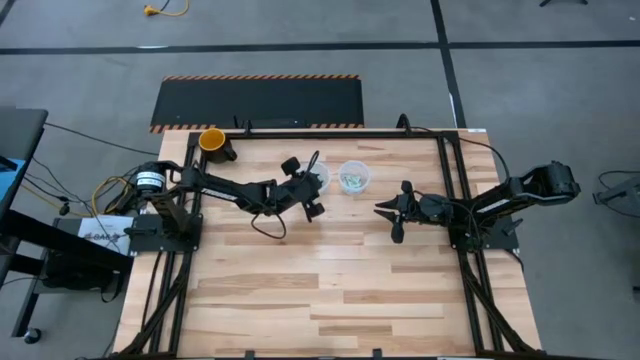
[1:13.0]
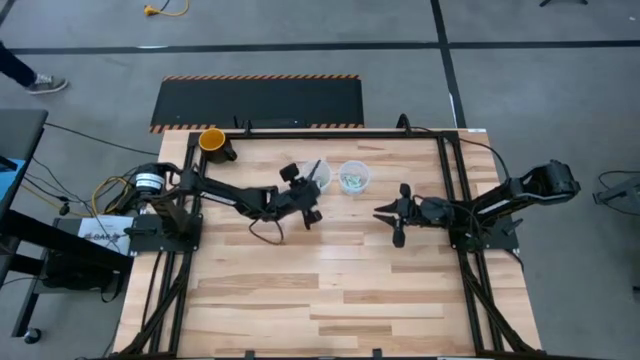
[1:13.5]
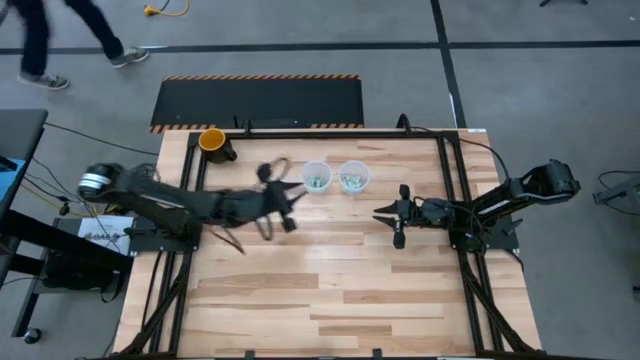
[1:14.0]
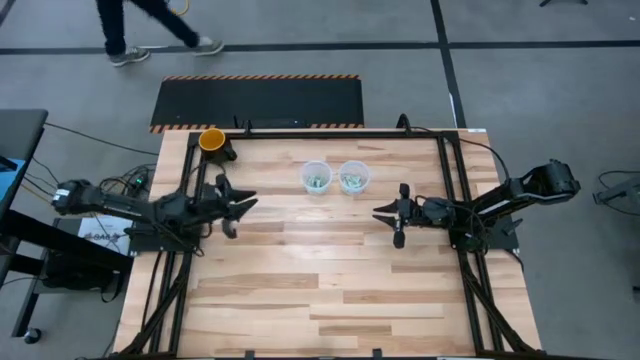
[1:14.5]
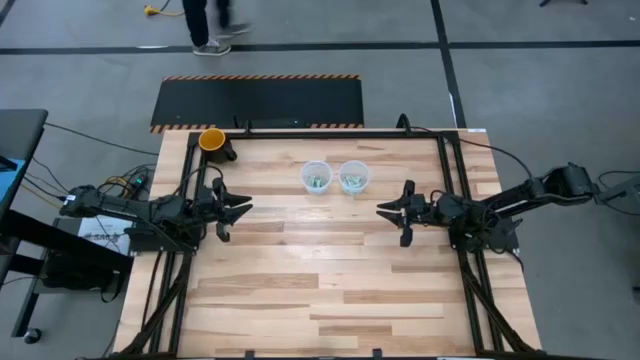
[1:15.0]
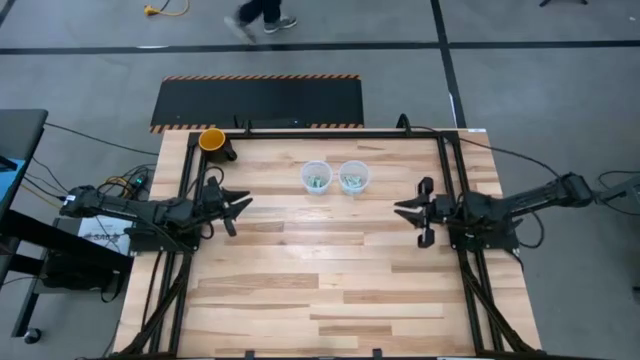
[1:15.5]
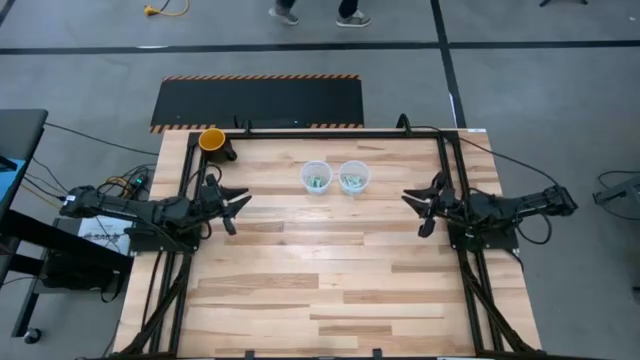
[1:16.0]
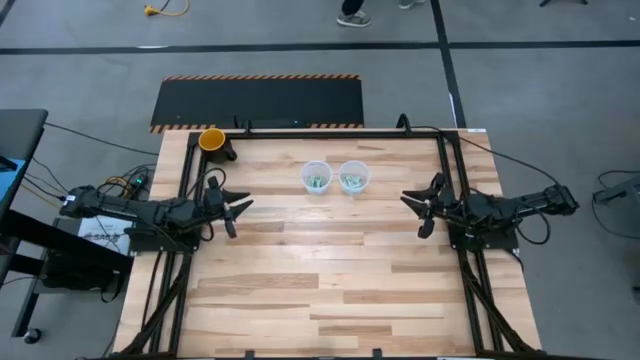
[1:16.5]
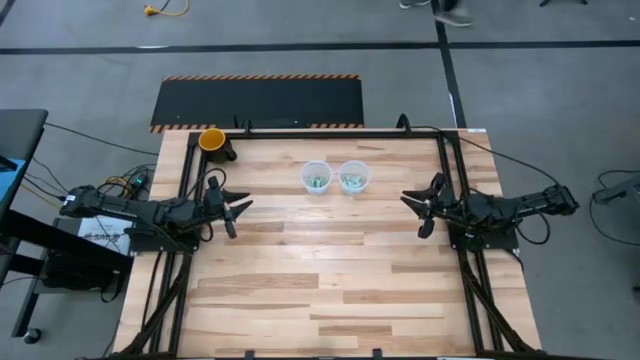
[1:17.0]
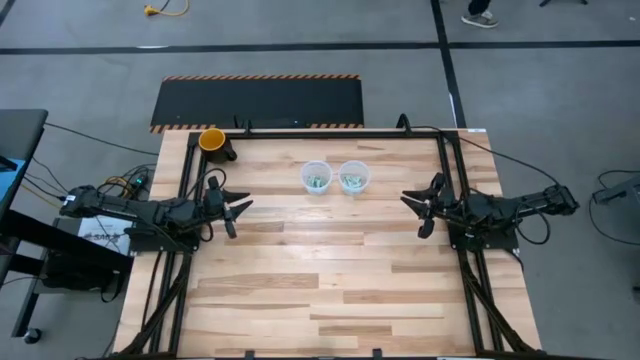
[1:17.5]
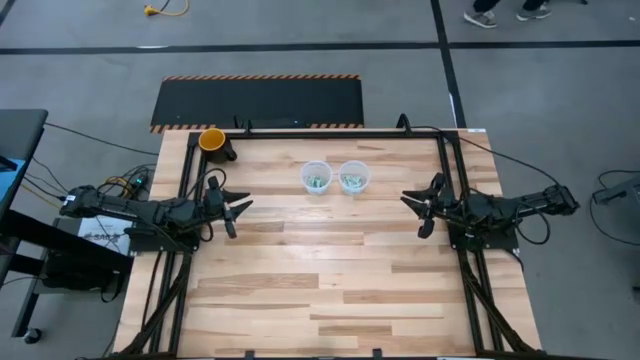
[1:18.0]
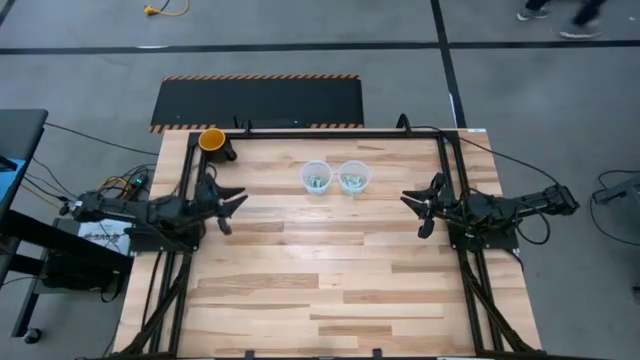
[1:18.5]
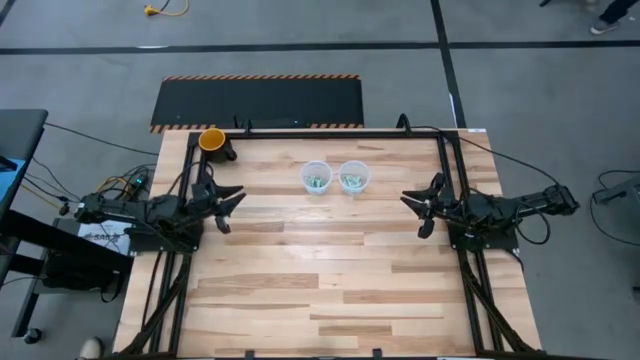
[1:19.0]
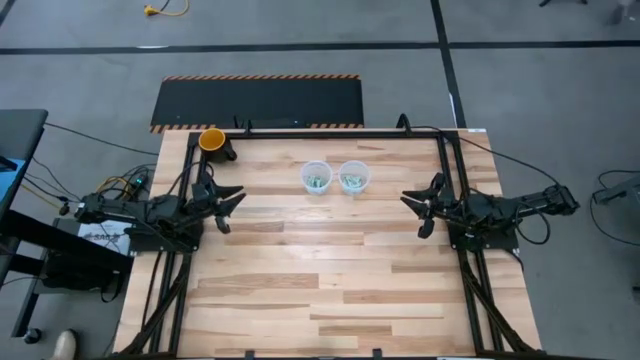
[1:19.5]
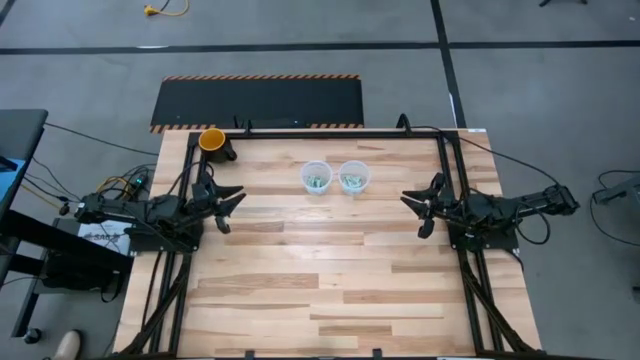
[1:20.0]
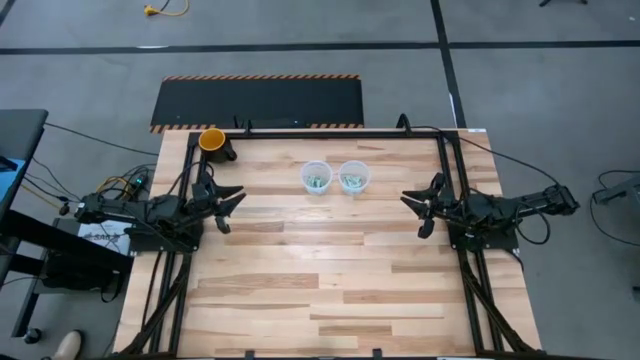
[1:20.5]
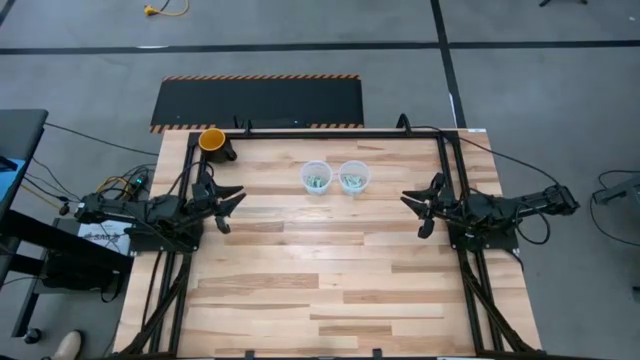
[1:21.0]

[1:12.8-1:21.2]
Task: Pick and place items into bin
Return to Home Position

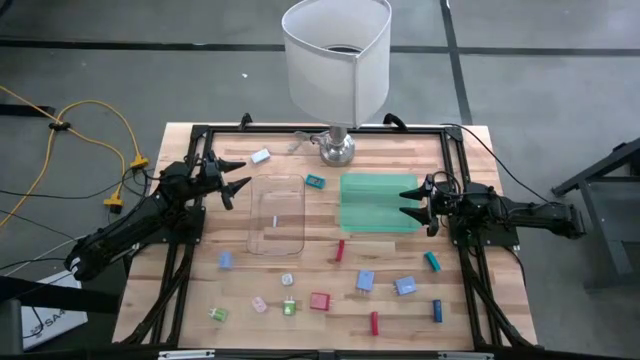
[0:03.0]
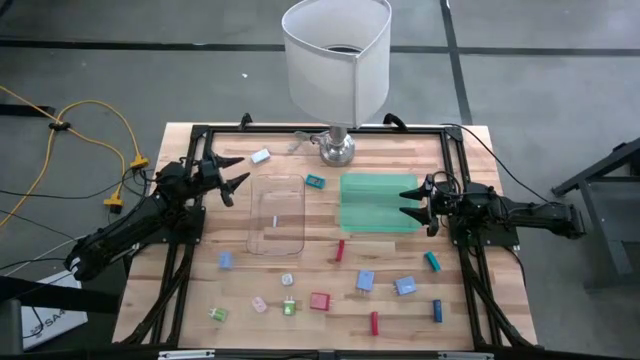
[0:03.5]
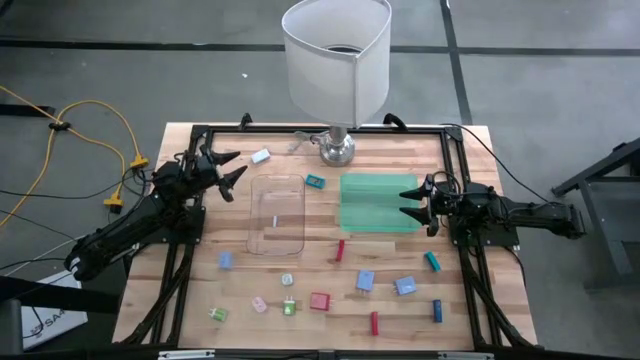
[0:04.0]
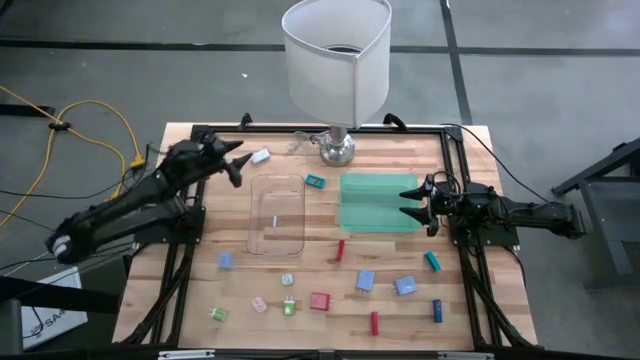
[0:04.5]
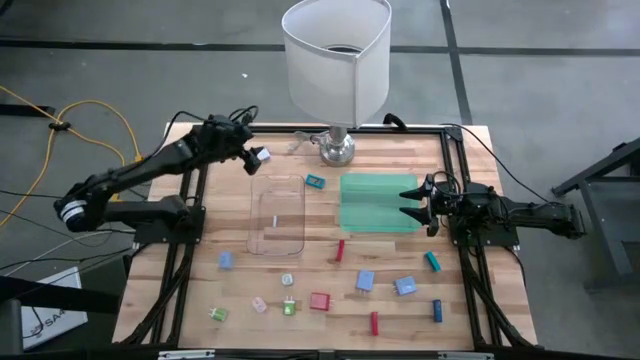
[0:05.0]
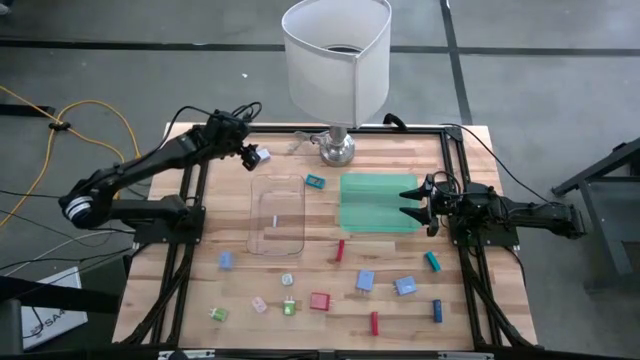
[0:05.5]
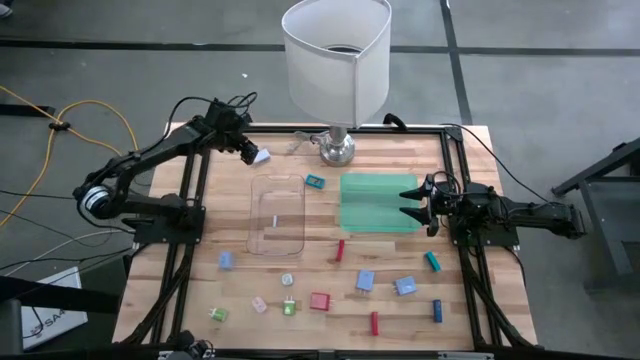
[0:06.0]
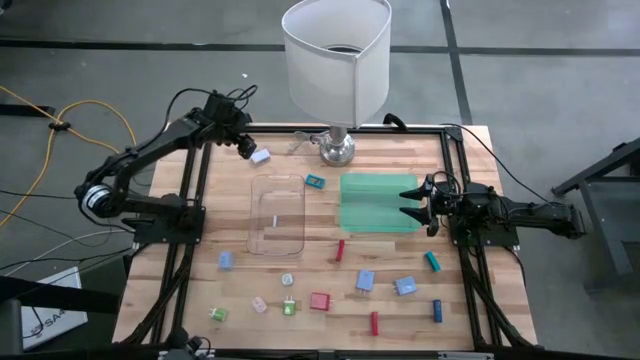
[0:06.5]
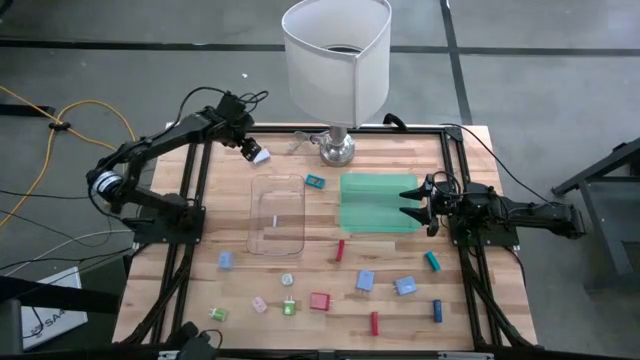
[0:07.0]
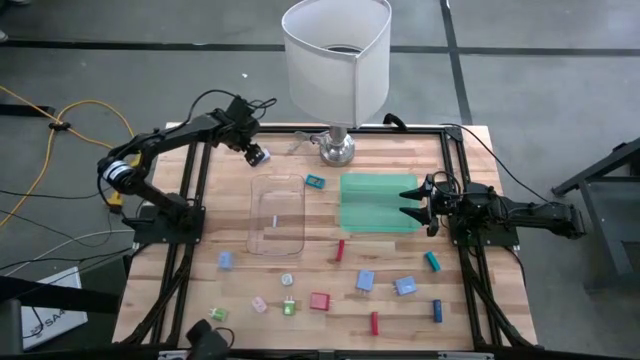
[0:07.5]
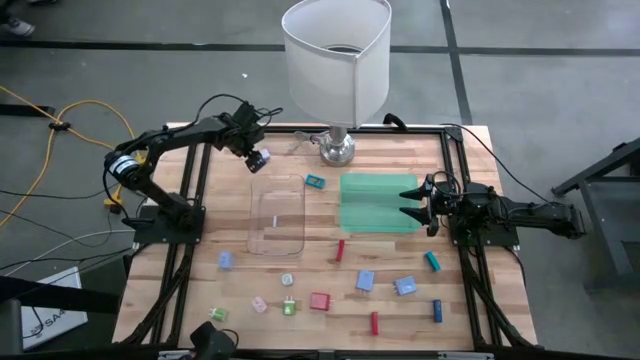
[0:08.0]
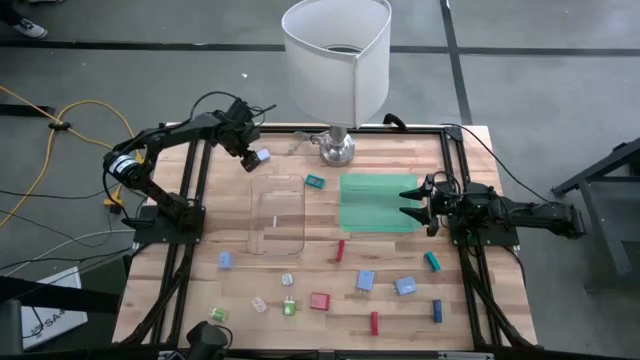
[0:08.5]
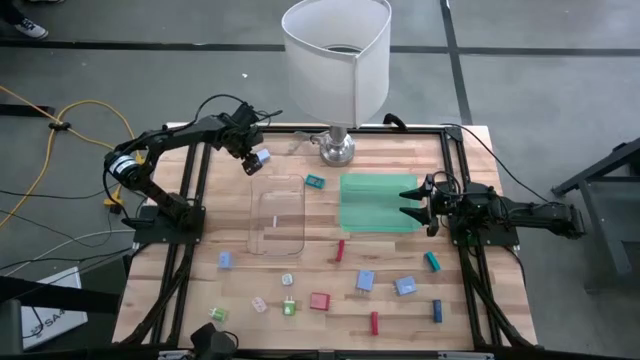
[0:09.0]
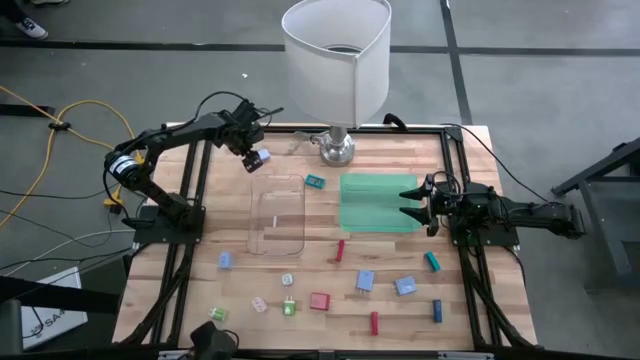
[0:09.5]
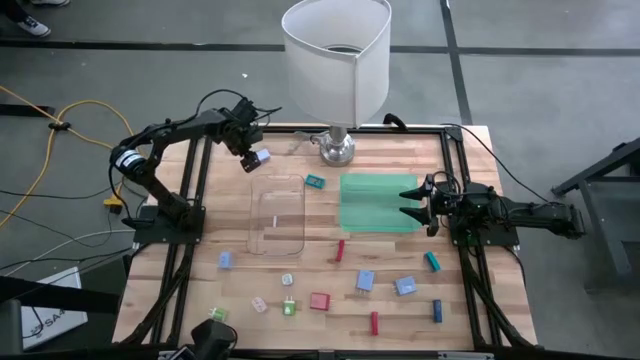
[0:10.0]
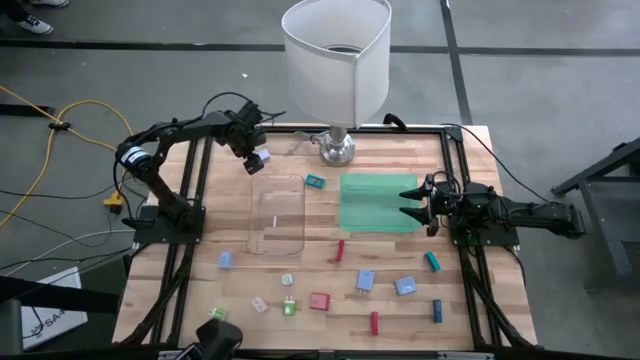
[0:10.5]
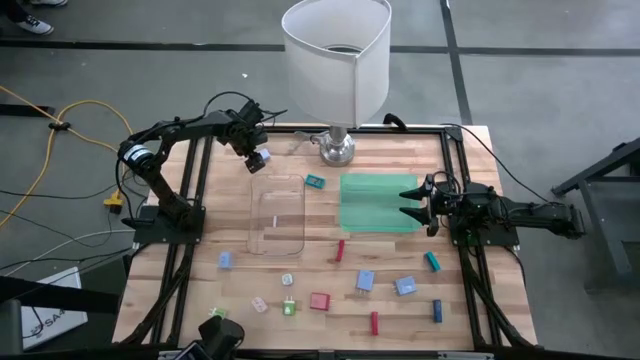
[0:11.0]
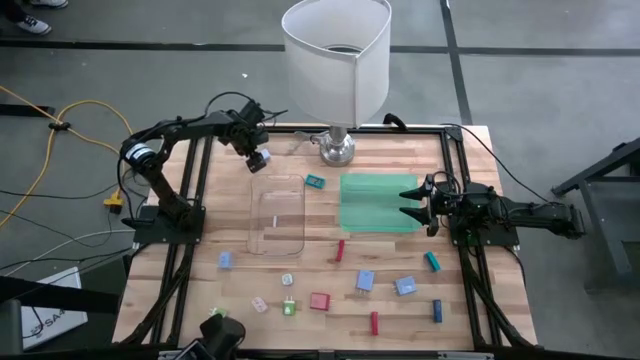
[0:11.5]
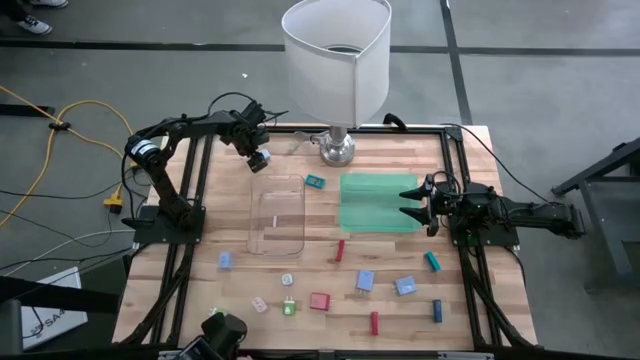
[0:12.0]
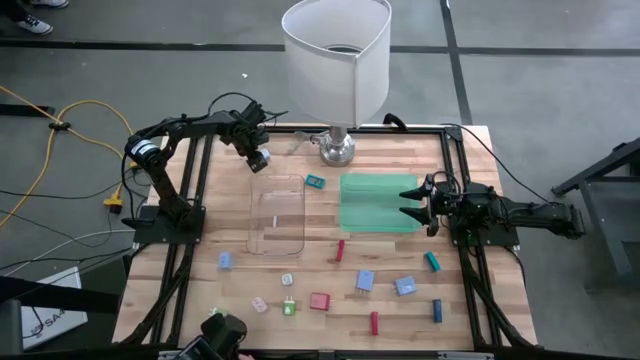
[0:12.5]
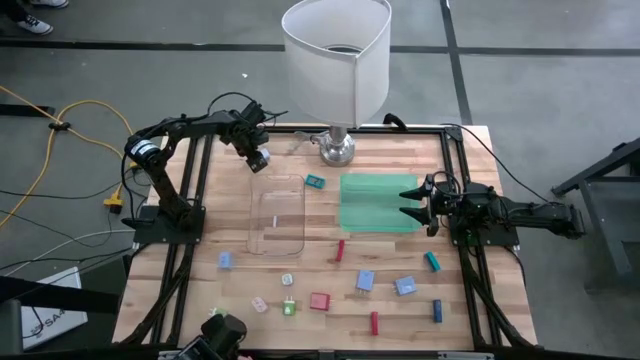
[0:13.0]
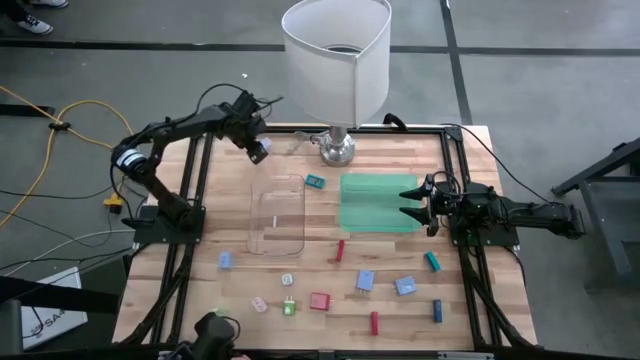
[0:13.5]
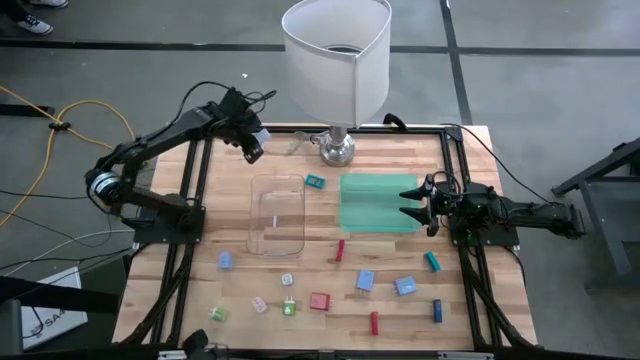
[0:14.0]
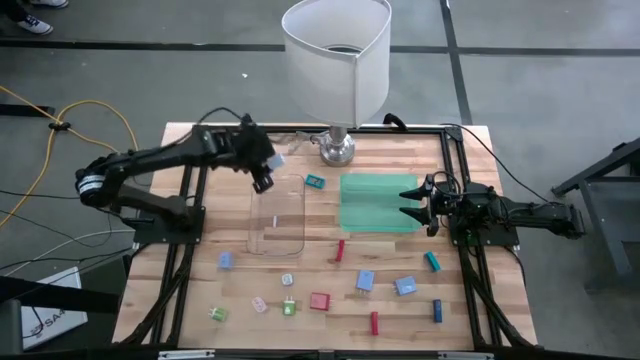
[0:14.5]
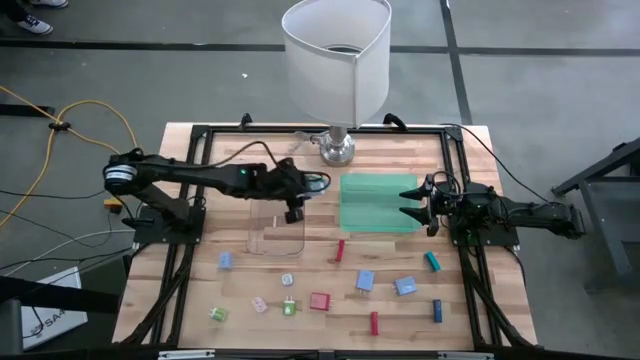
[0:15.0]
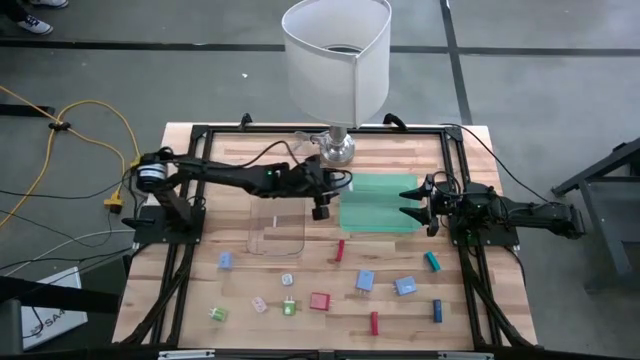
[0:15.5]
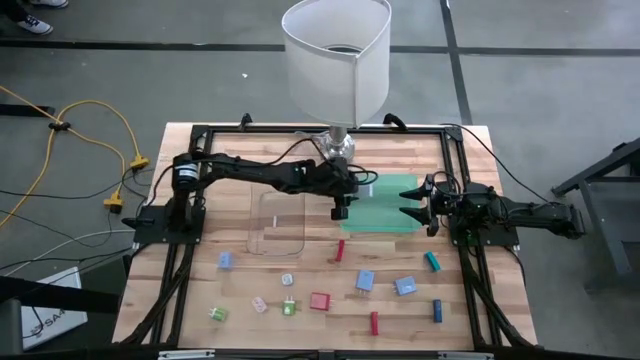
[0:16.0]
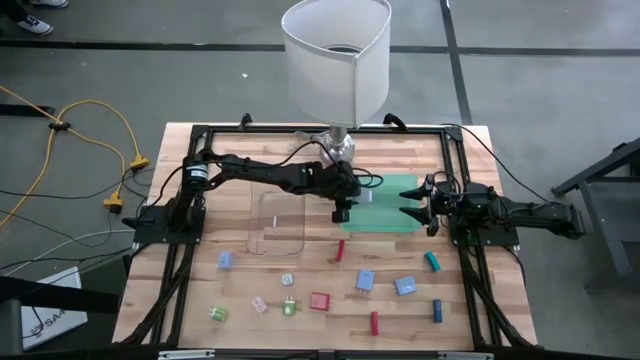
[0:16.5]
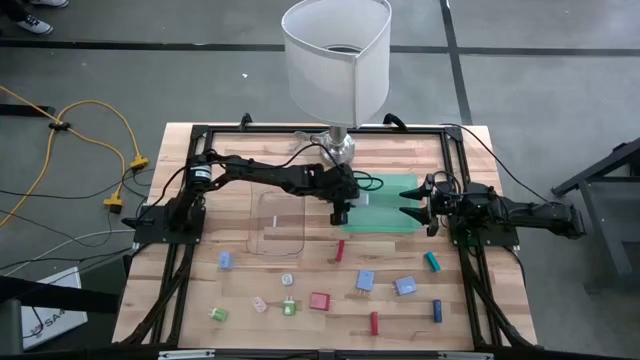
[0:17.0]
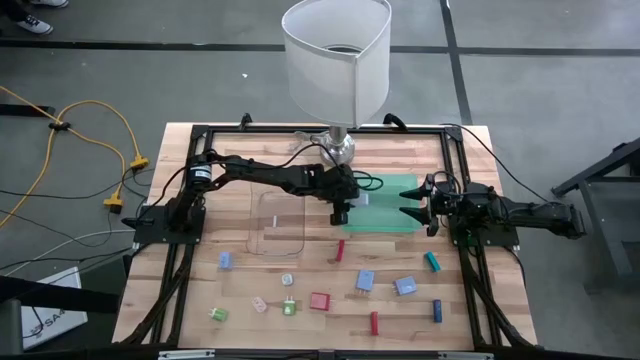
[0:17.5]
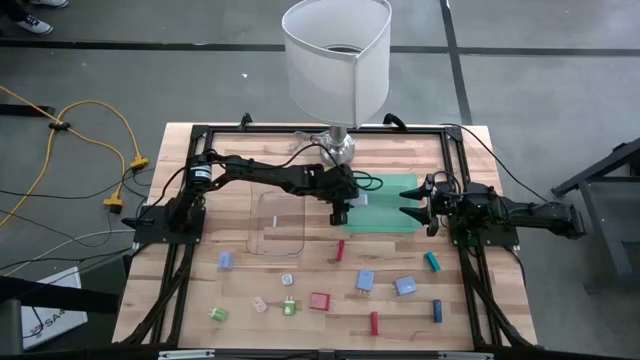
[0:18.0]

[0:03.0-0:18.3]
Task: Pick & Place Office items
Put the white timer into the green bin
